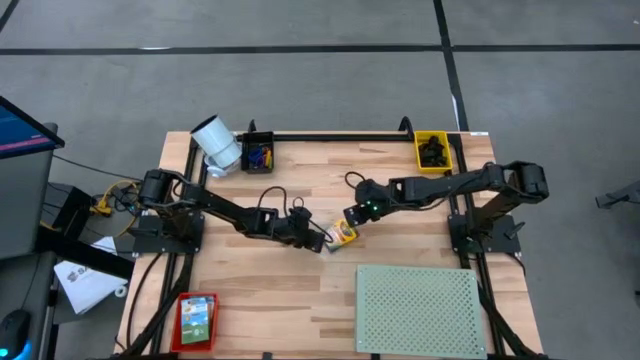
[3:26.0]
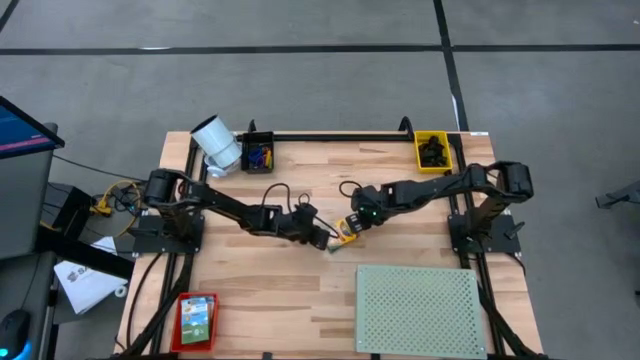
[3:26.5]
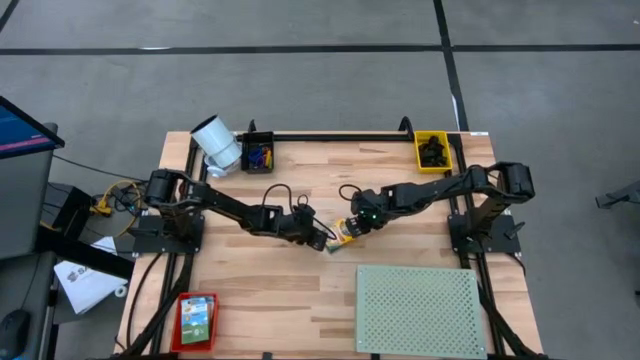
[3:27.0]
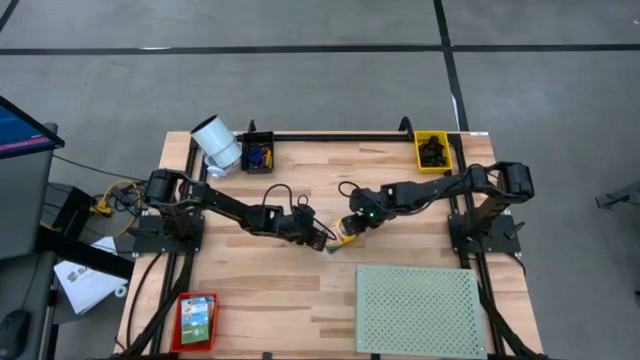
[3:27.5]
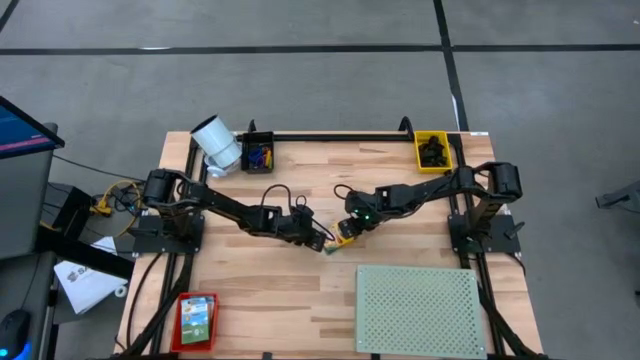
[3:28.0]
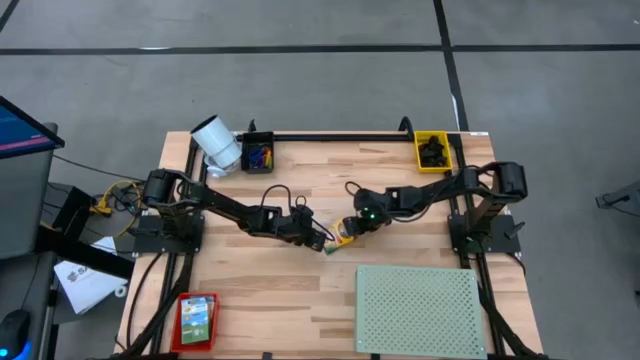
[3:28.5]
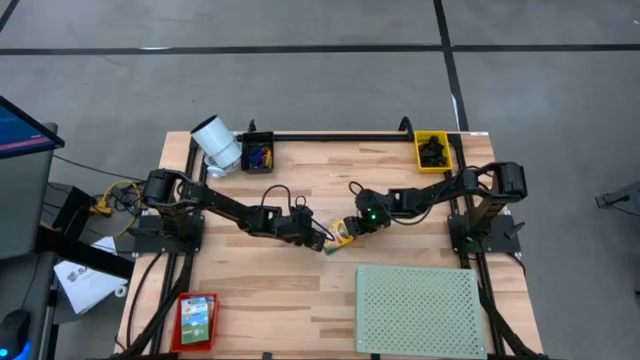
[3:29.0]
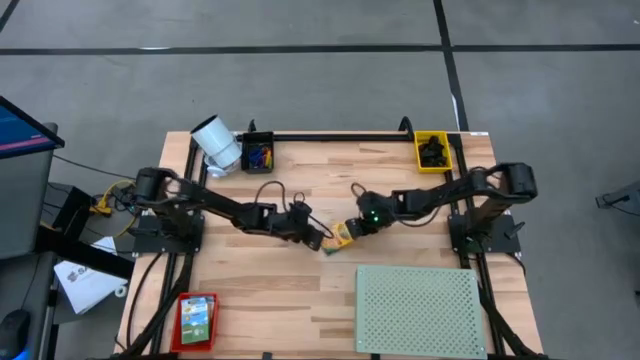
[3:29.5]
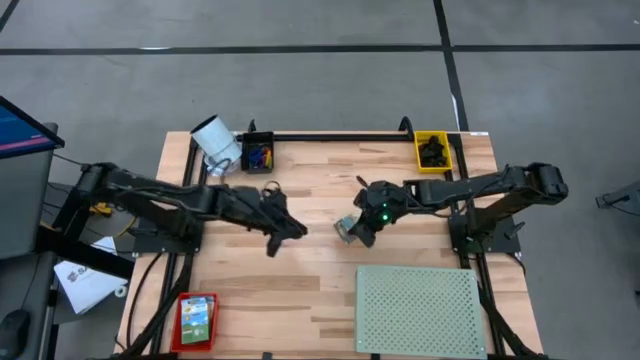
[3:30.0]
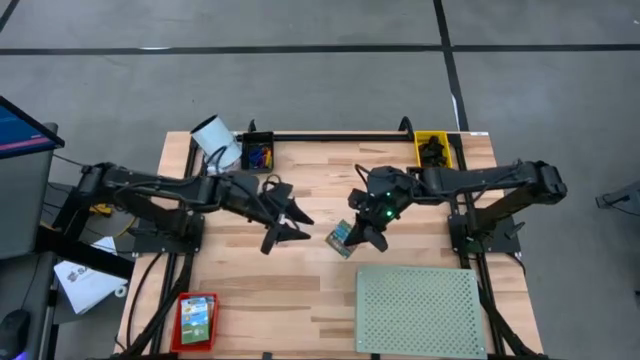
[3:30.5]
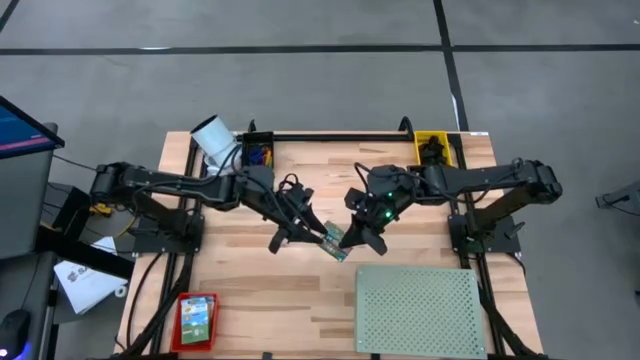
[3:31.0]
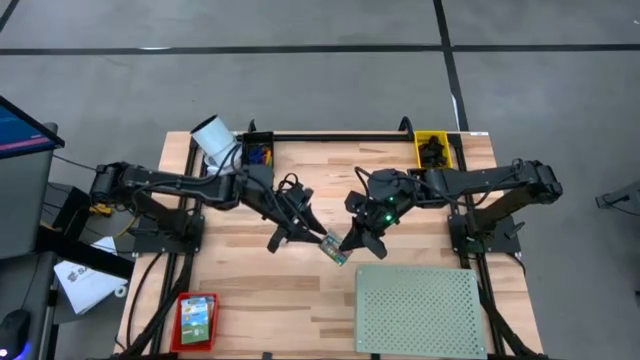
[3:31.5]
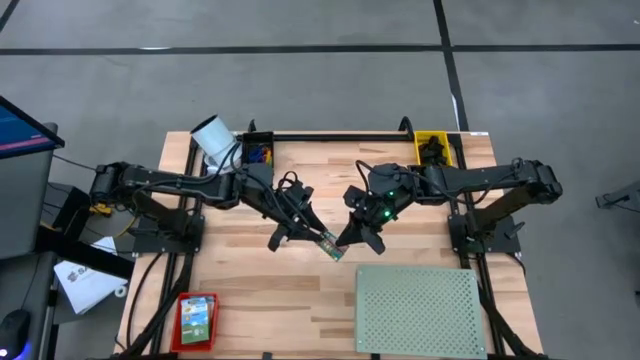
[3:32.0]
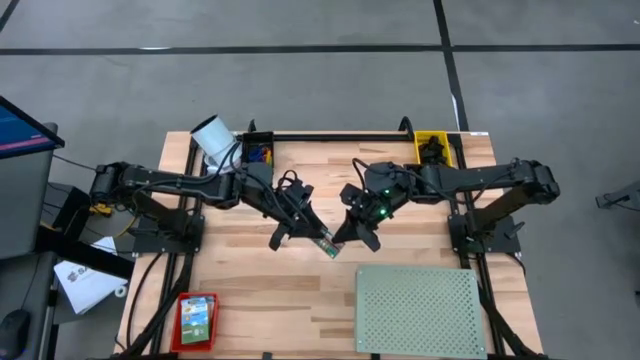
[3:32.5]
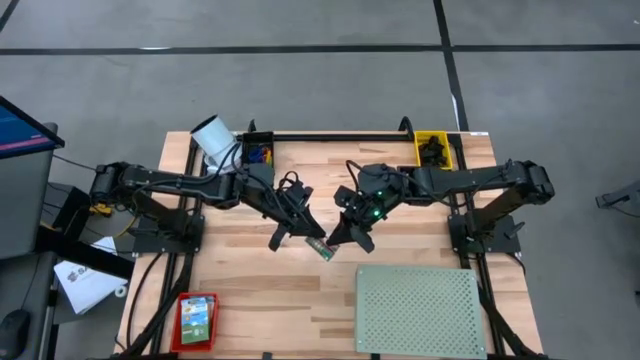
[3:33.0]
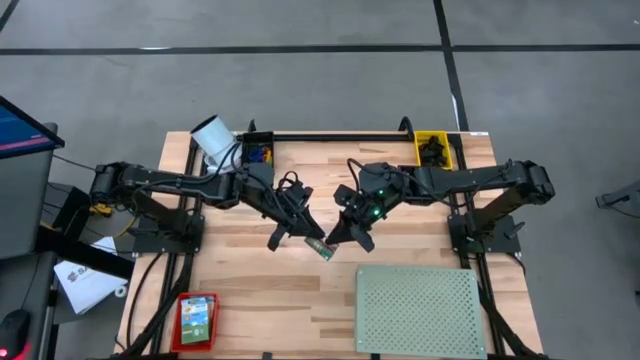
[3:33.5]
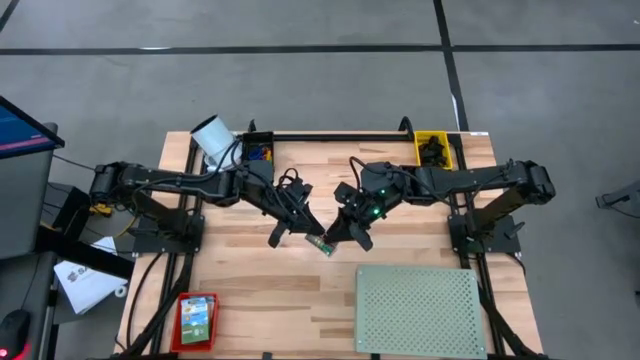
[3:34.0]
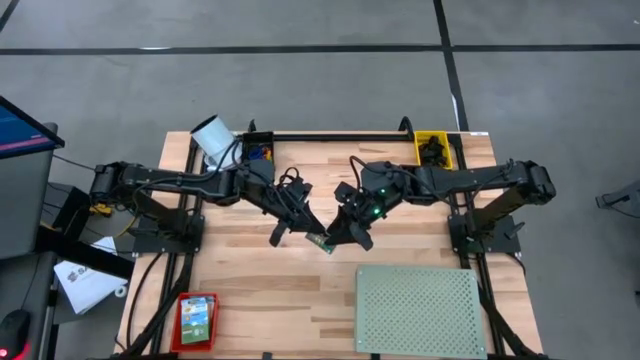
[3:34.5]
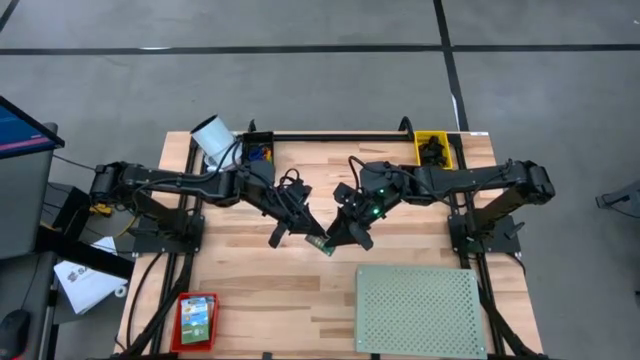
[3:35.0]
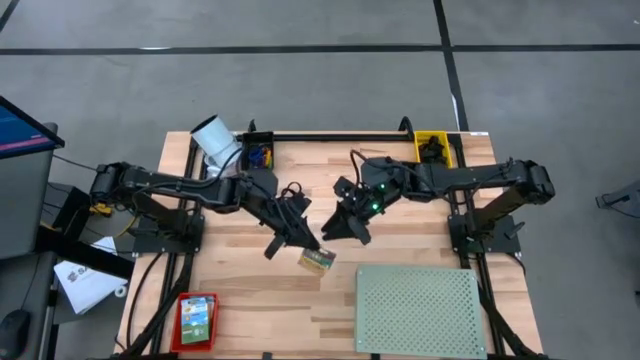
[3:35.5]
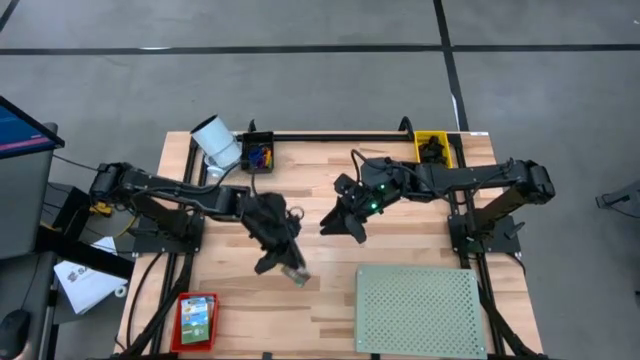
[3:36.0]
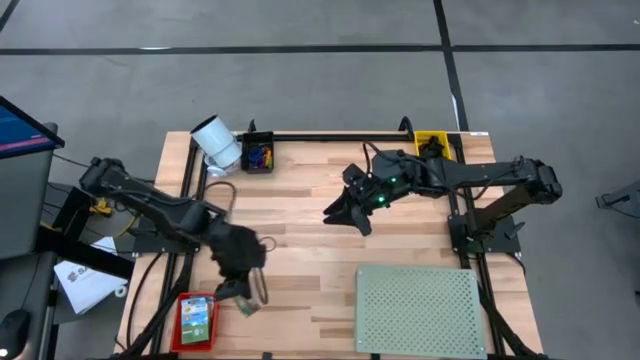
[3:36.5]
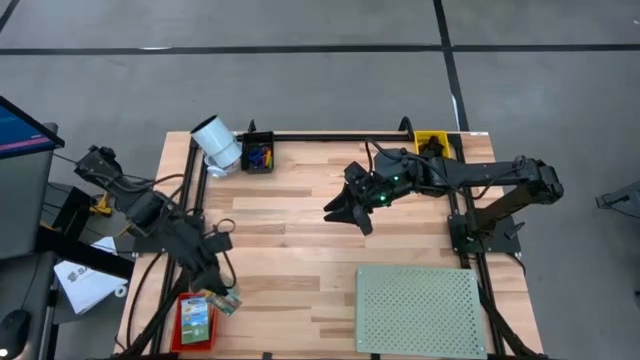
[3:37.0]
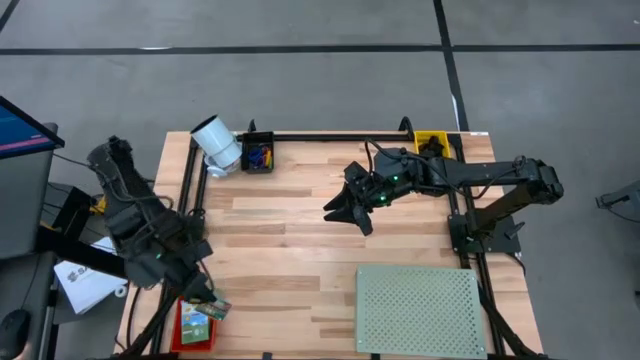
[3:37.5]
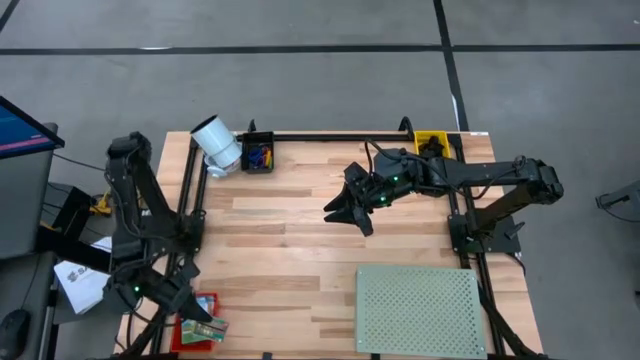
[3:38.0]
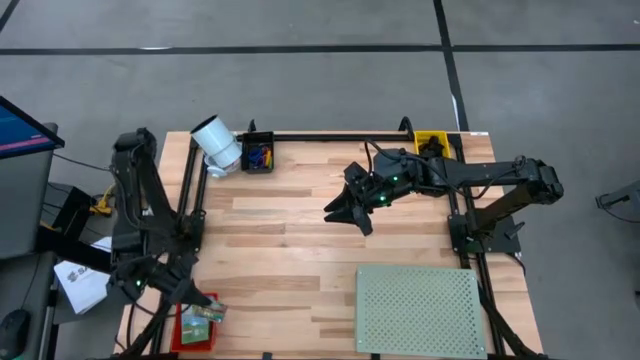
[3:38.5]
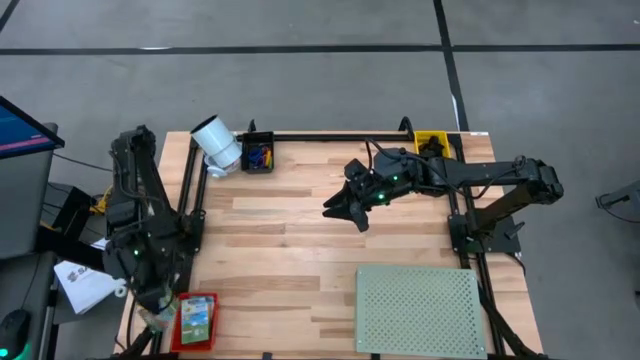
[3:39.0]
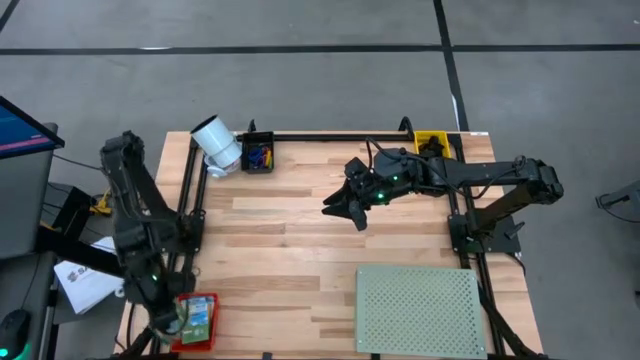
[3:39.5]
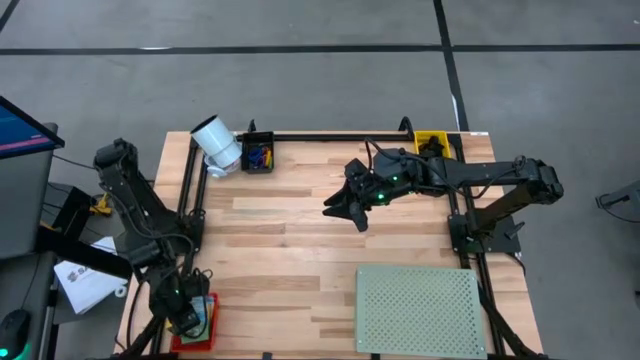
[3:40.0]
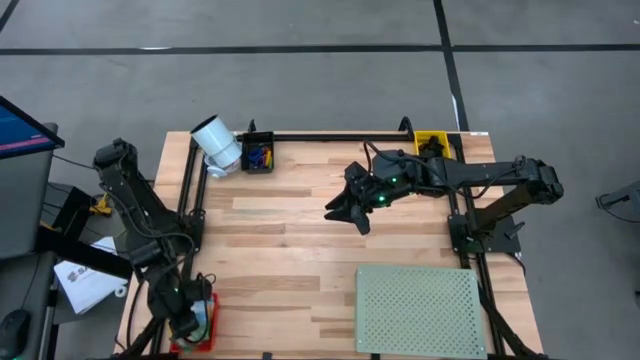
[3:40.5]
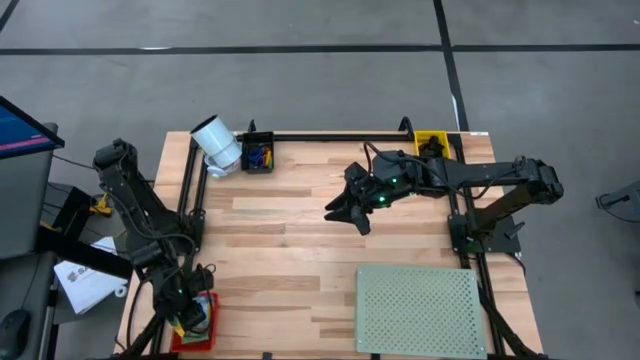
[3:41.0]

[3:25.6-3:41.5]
Task: Pick & Place Office Desk Supplies
Put the green crayon box into the orange bin

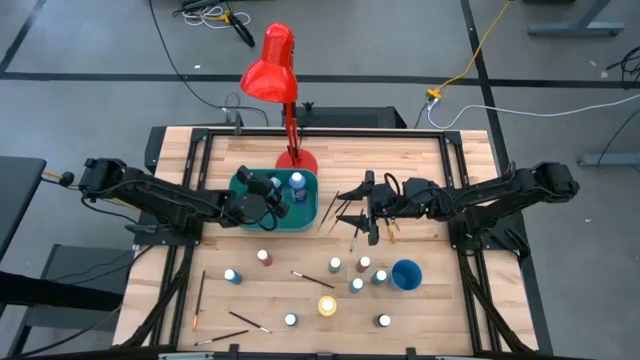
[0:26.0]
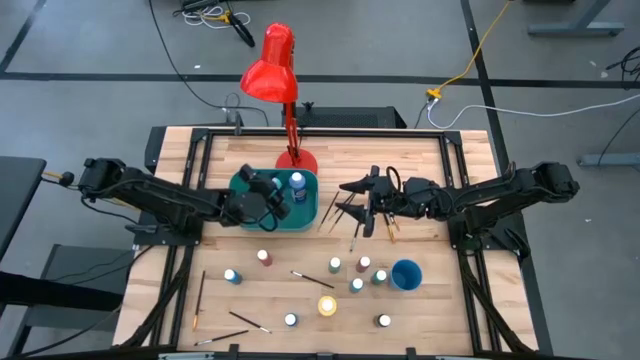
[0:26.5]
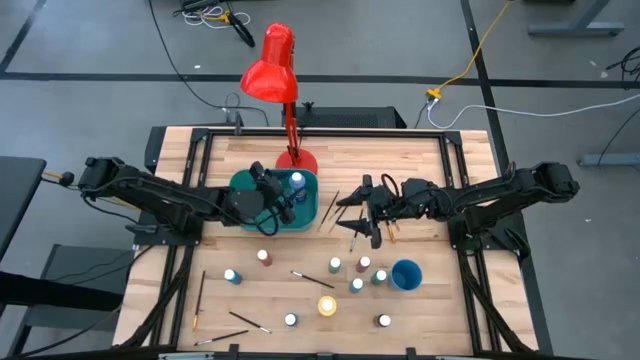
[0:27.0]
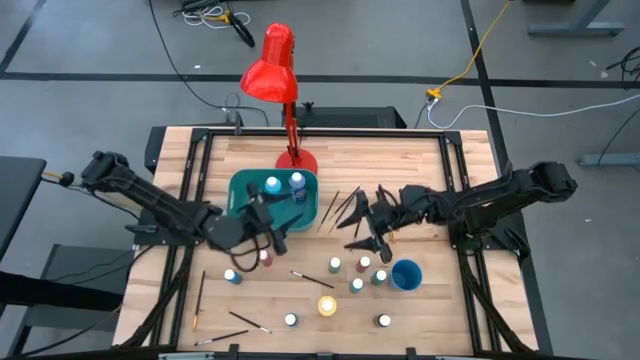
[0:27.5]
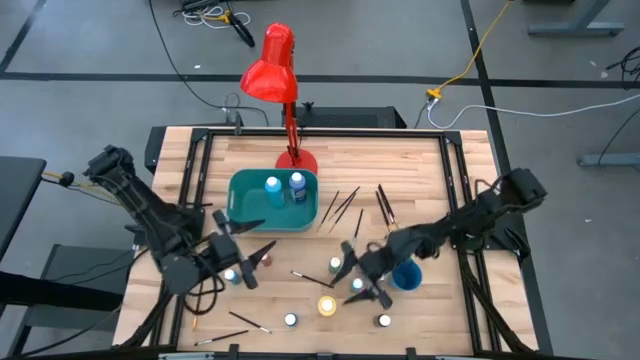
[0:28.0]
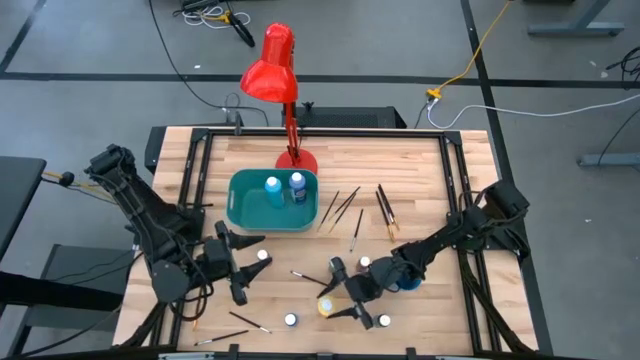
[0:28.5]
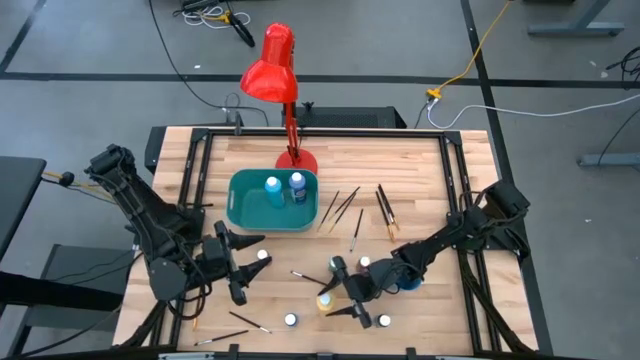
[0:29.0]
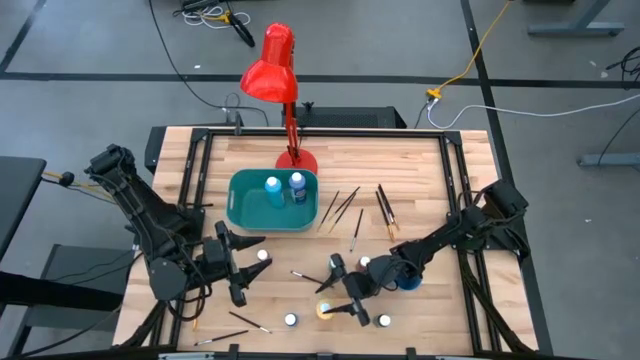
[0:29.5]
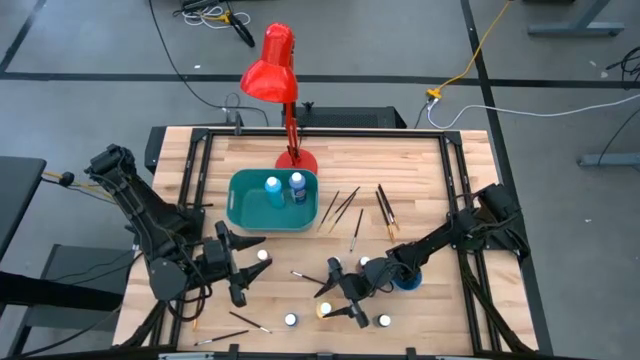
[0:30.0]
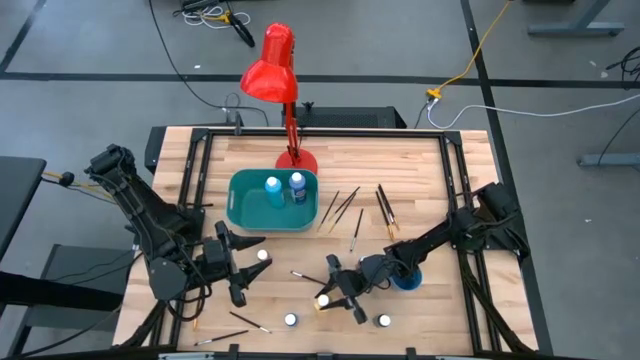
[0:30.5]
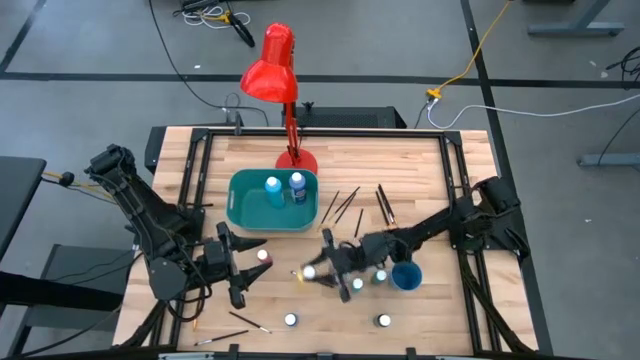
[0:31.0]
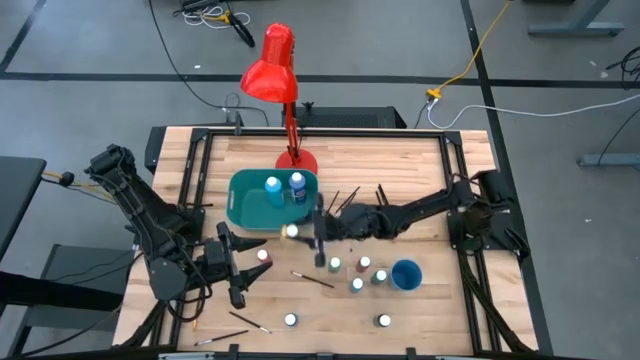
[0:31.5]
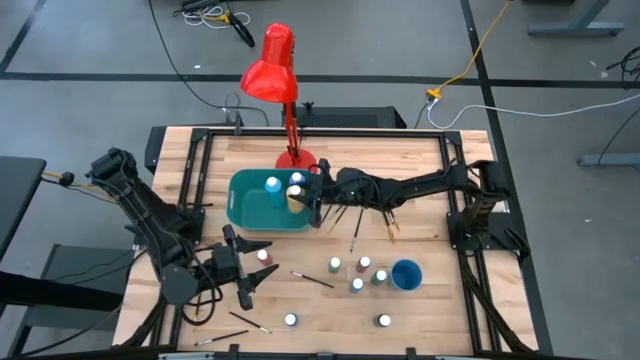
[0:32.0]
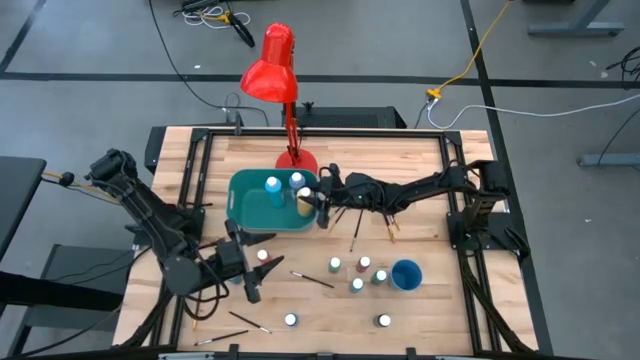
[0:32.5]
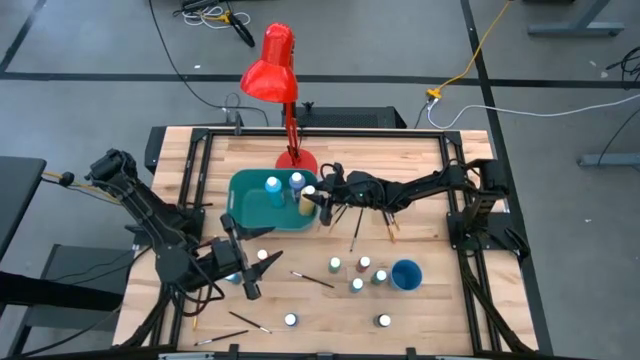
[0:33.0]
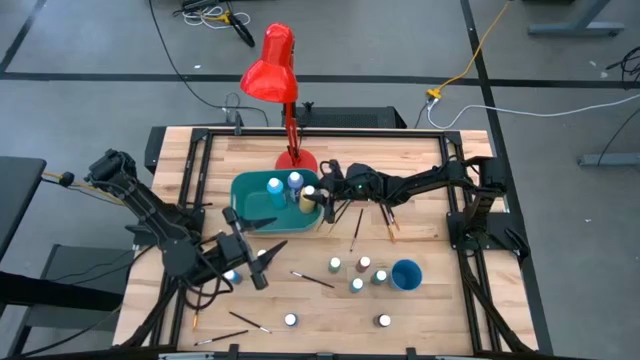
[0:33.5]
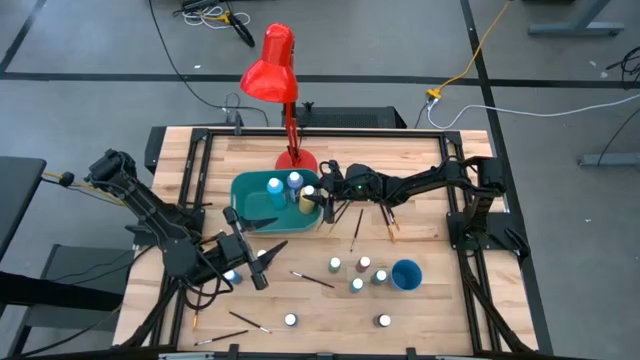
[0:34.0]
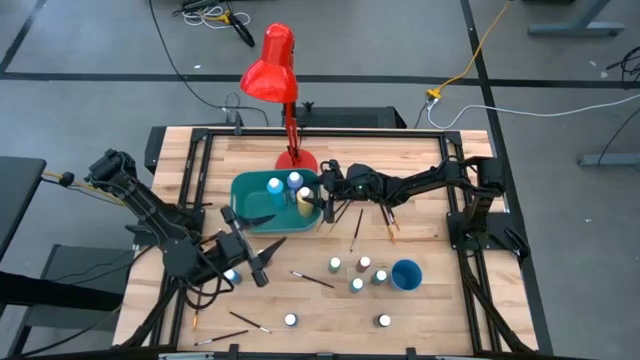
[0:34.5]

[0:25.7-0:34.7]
Task: Pick & Place Paint Supplies
Put the large yellow paint bottle into the green bin
